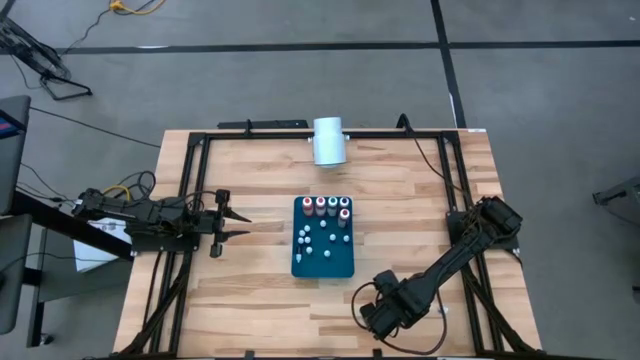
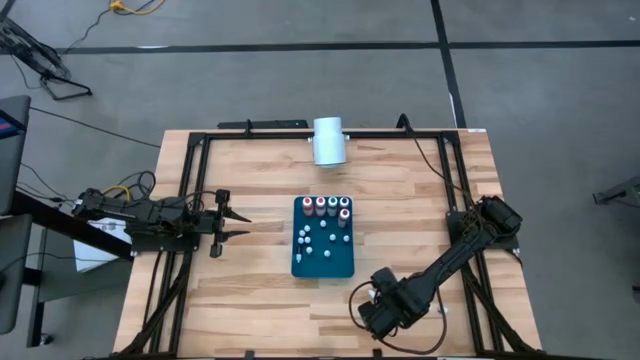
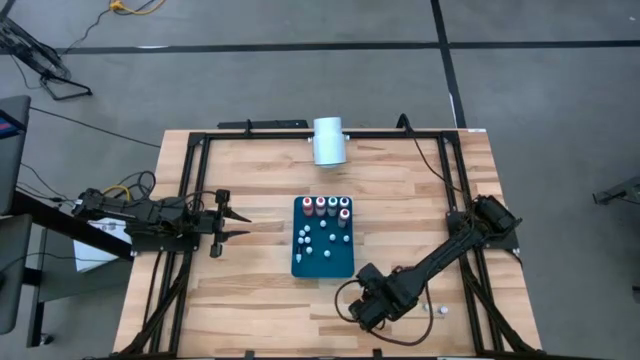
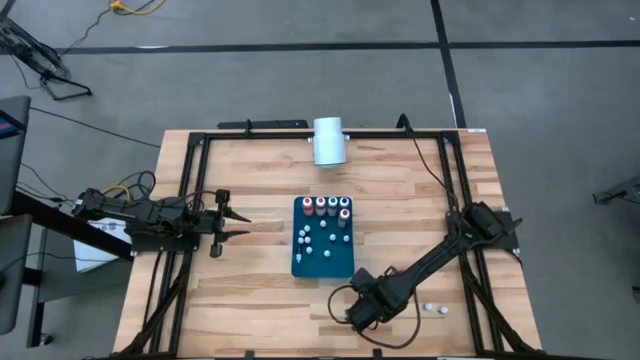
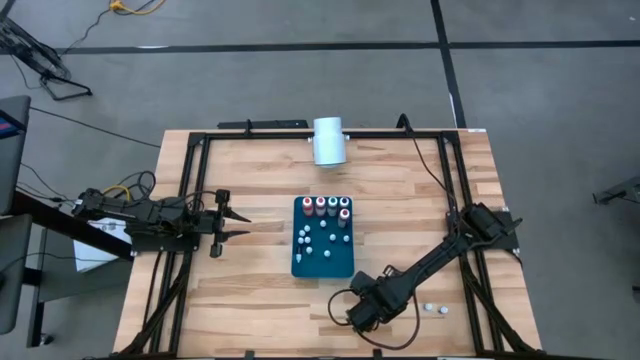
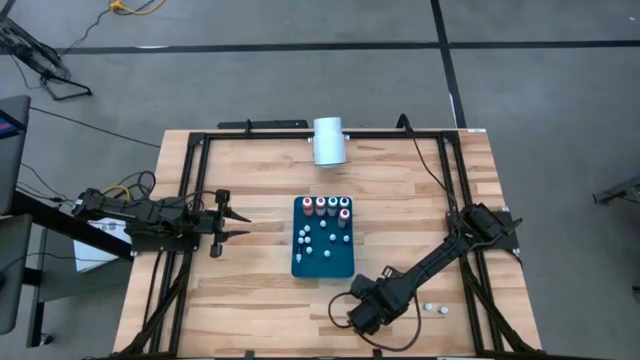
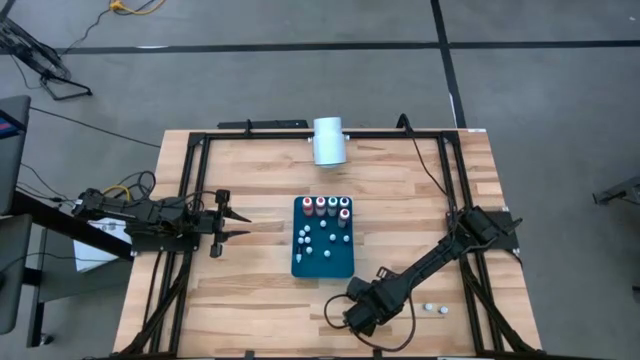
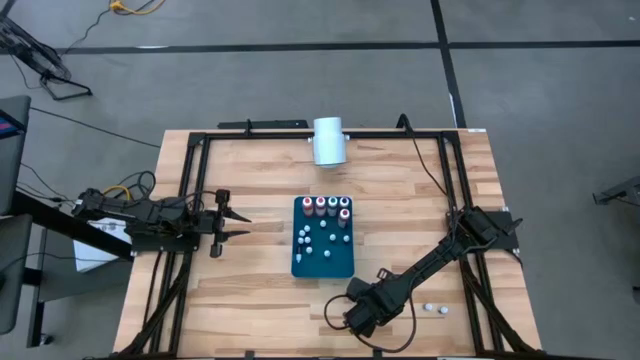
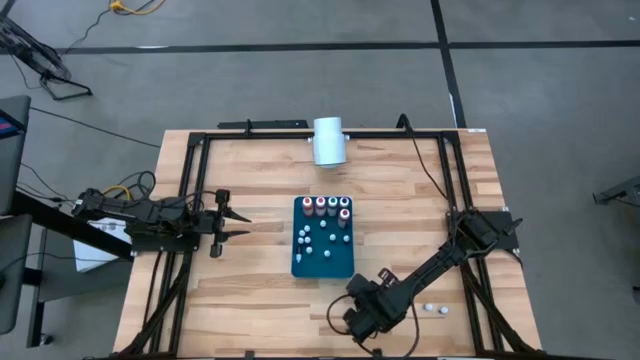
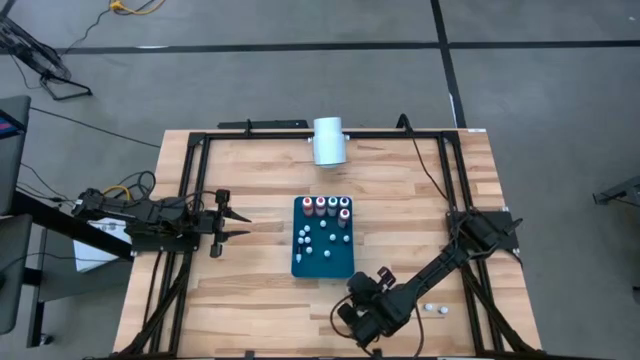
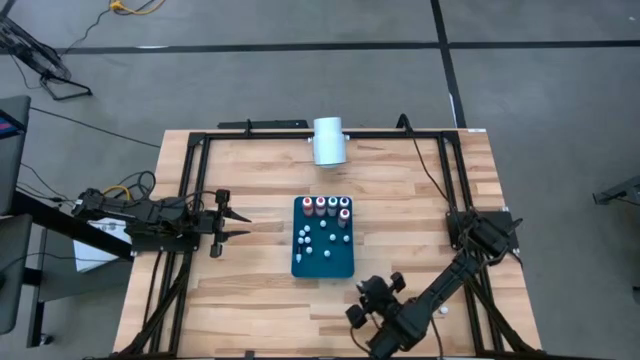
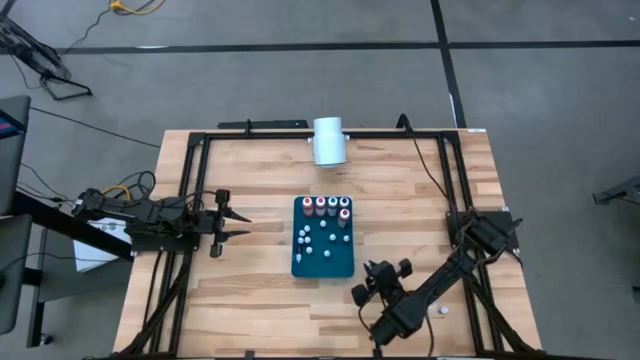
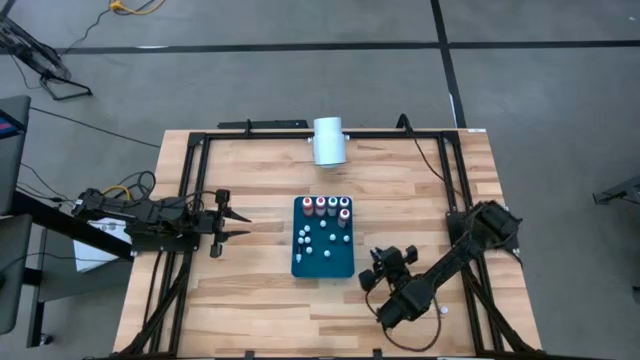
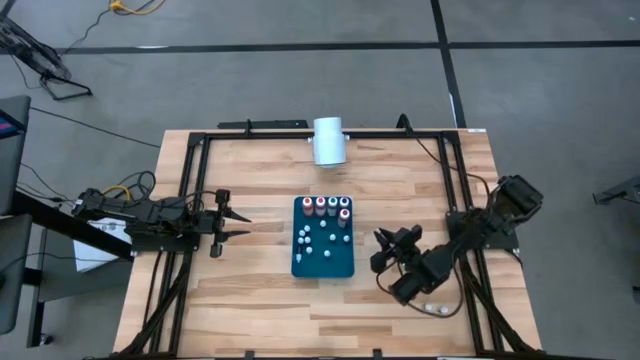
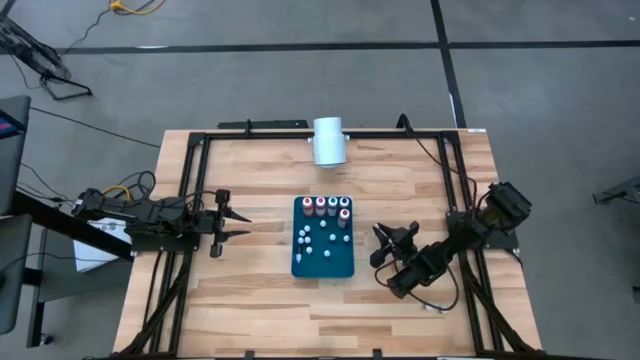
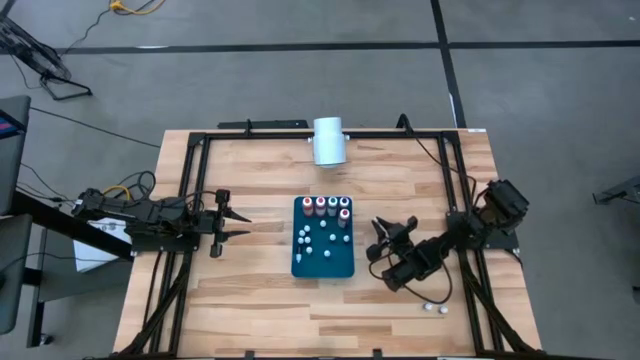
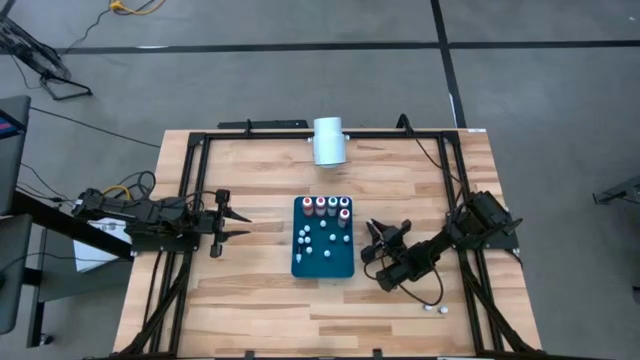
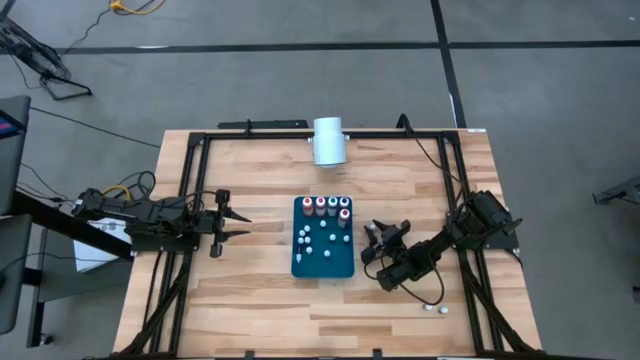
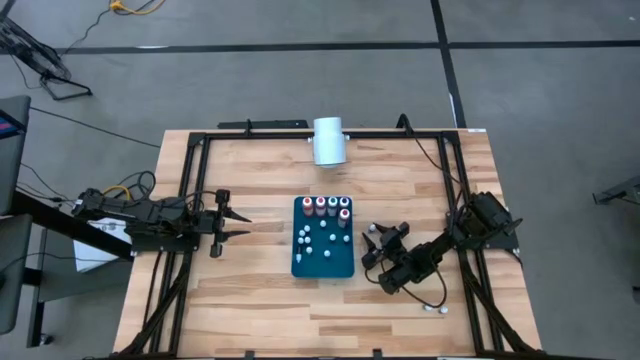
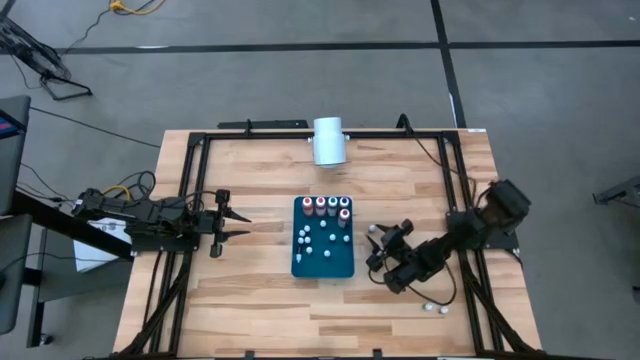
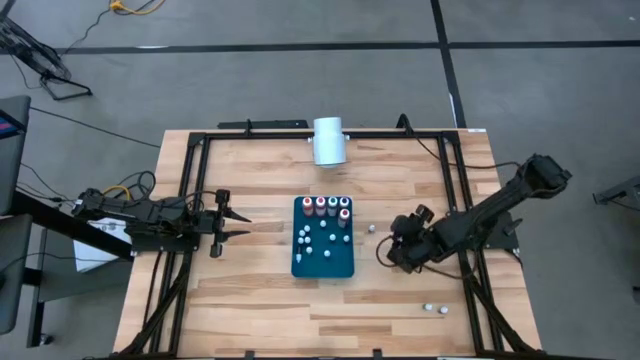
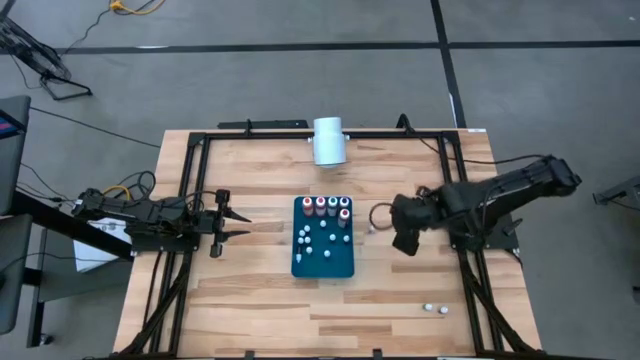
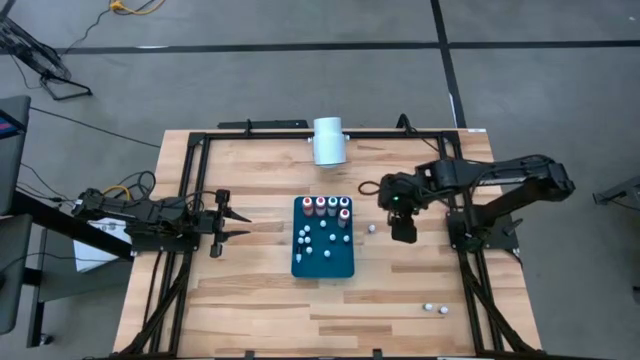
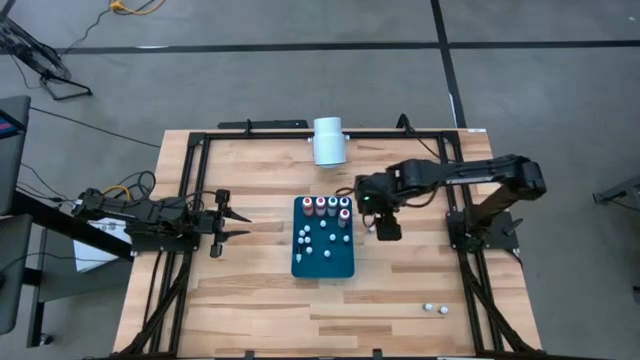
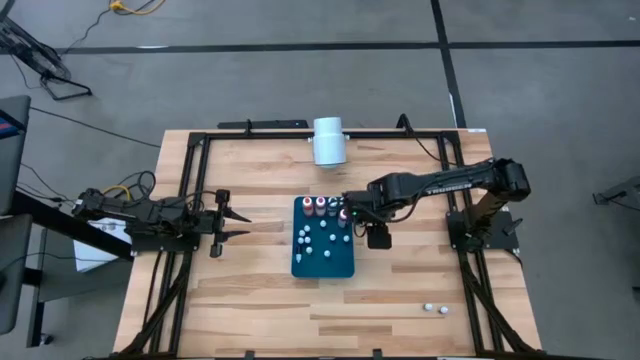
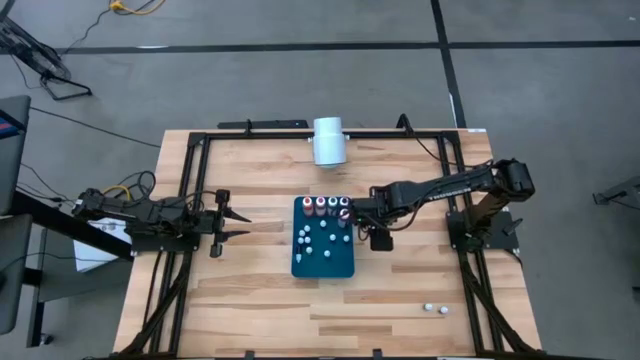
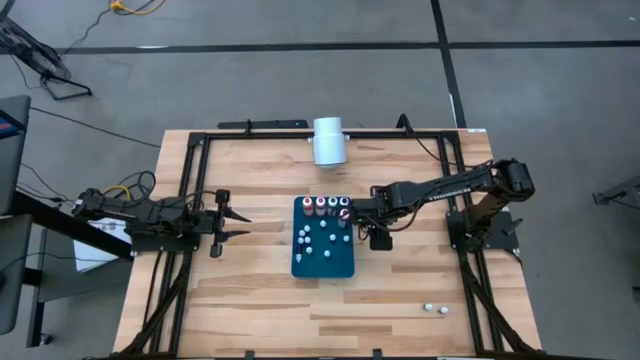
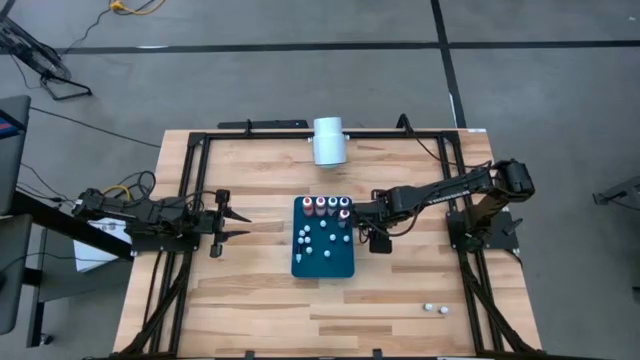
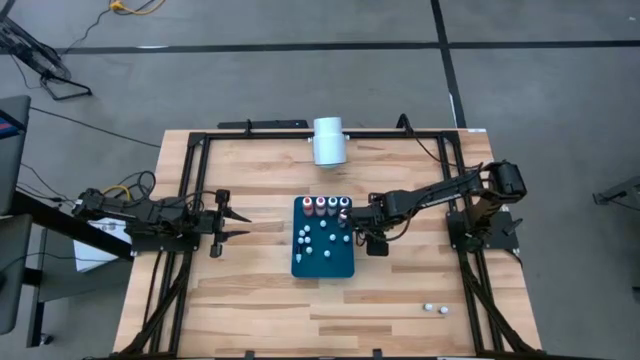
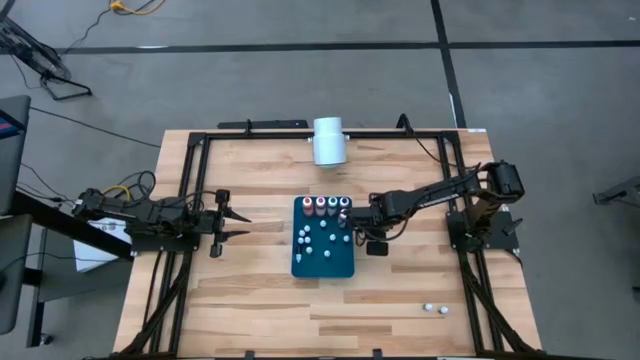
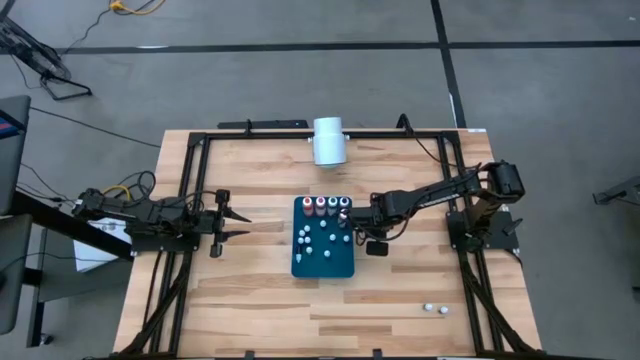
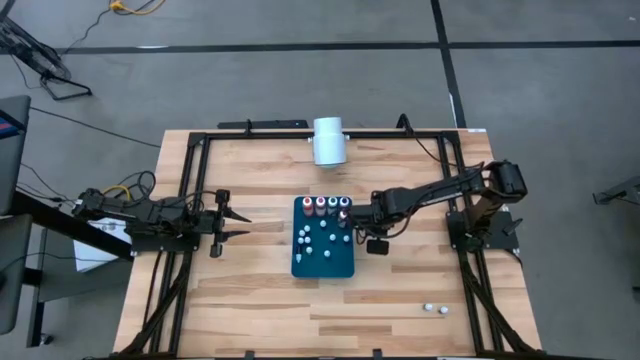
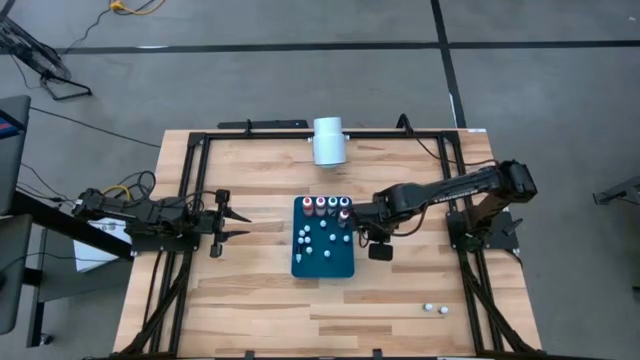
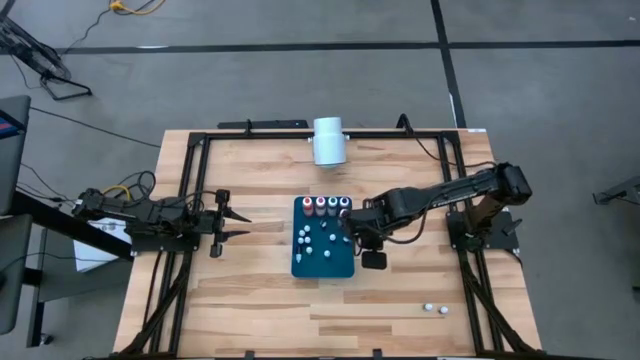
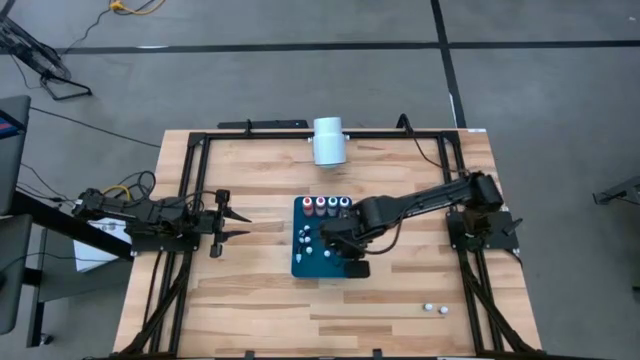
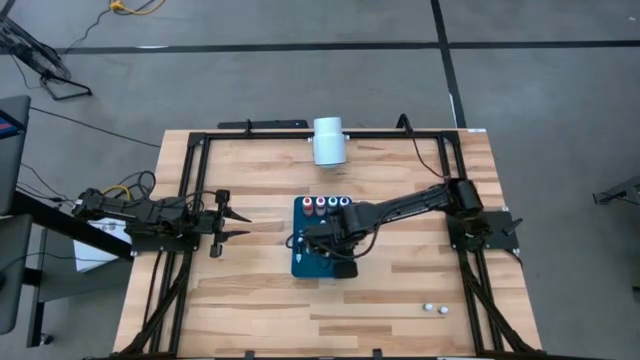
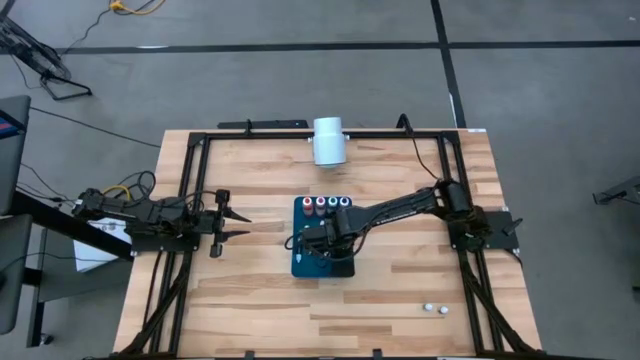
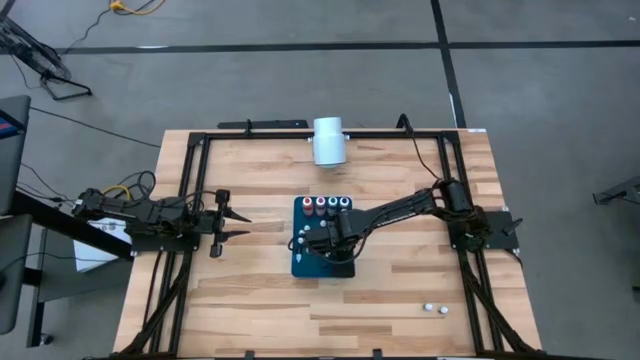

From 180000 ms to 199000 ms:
Task: Pick & Place food coloring
Put the small brown food coloring bottle into the blue bin

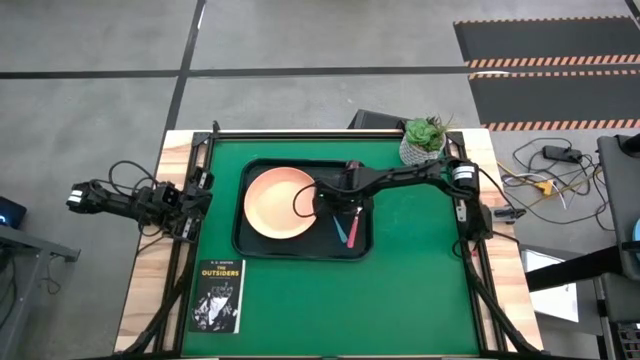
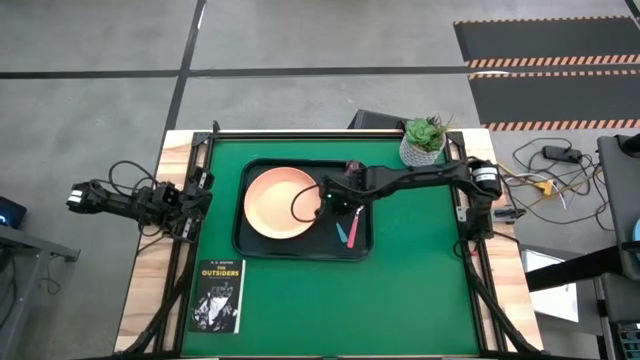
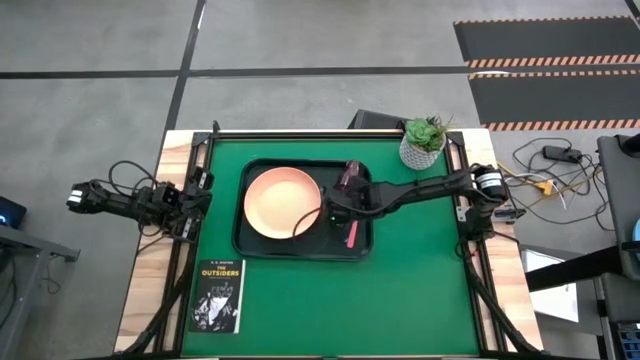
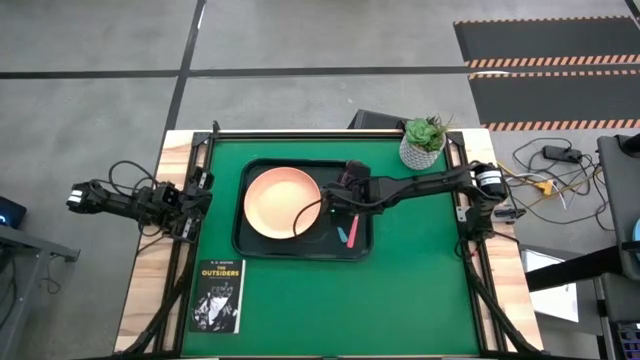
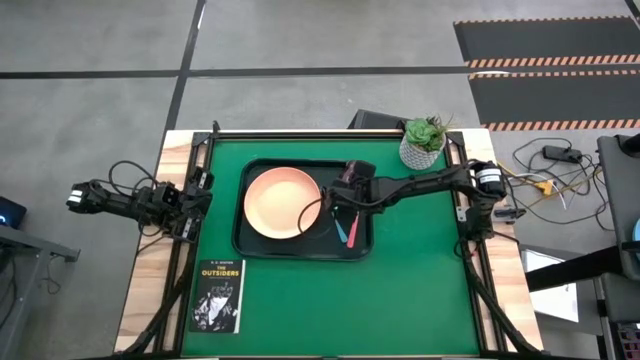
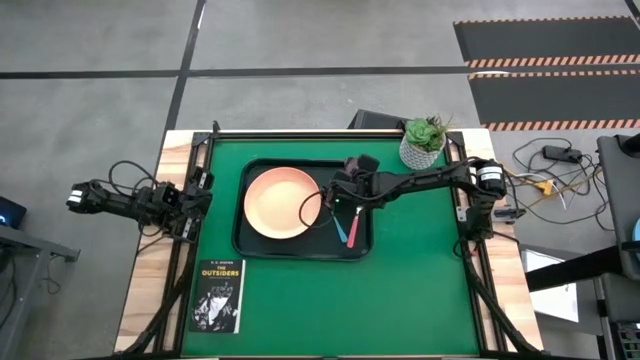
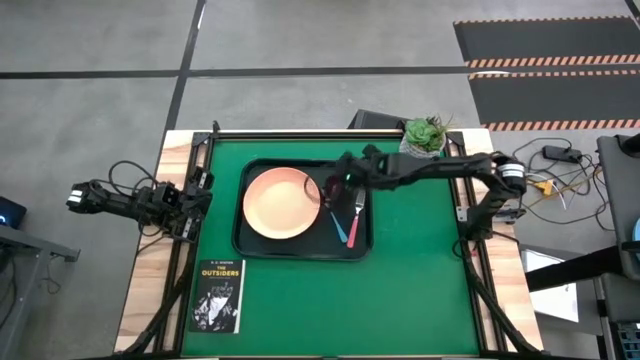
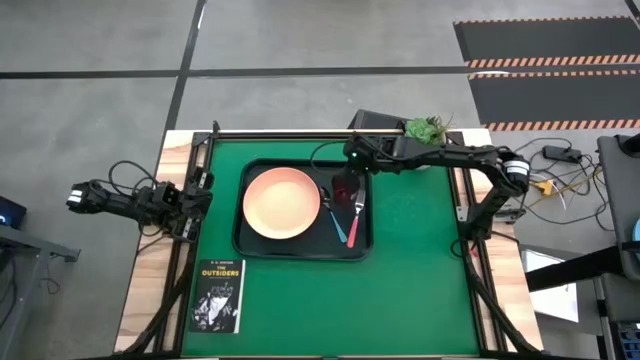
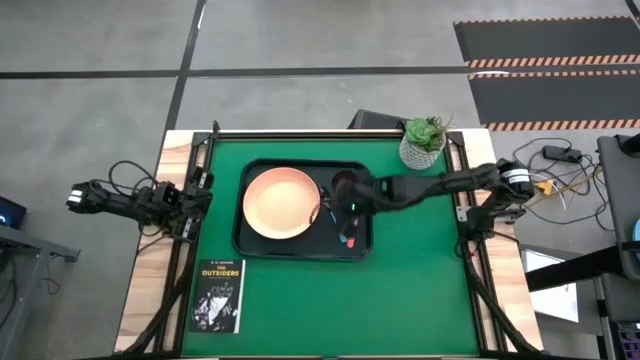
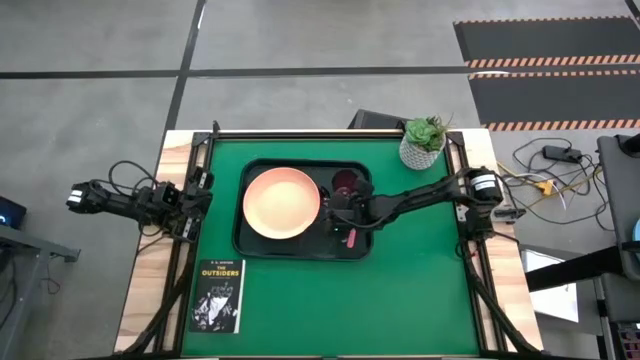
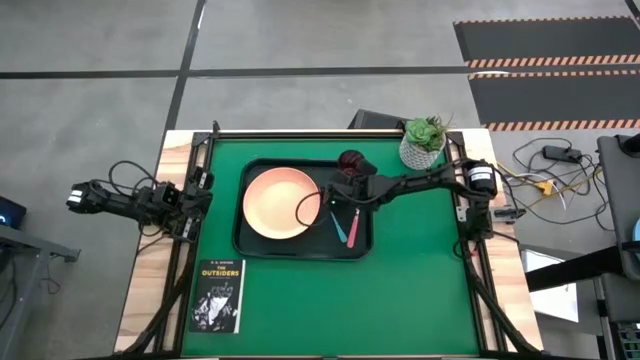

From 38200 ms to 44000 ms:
Task: Pick and place plate/cup/fork/spoon on tray
Adjust the red cup on the black tray
